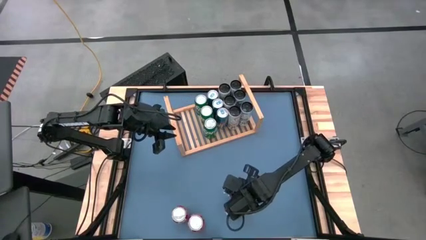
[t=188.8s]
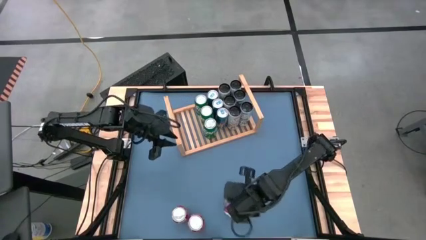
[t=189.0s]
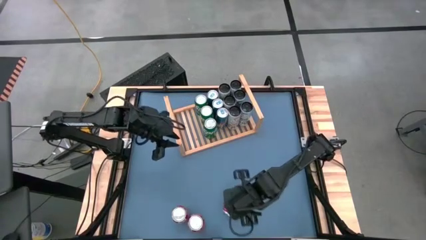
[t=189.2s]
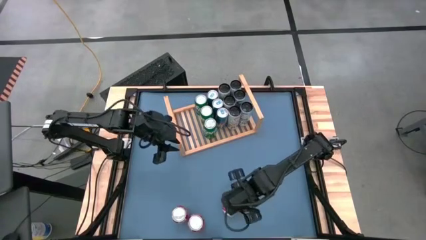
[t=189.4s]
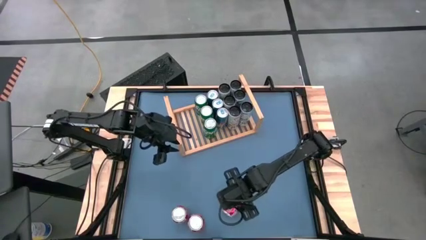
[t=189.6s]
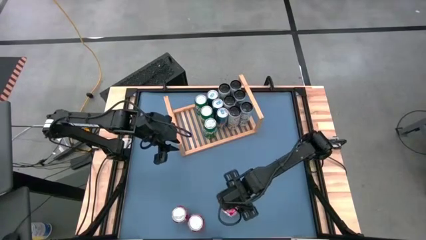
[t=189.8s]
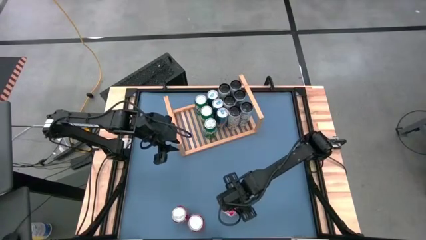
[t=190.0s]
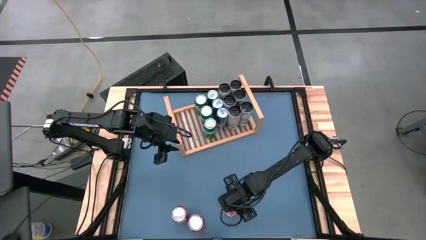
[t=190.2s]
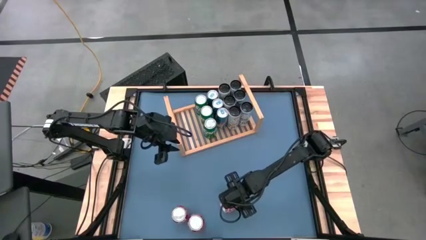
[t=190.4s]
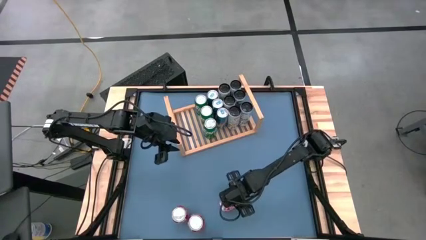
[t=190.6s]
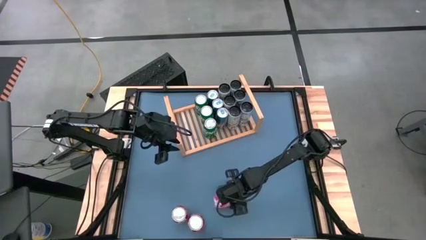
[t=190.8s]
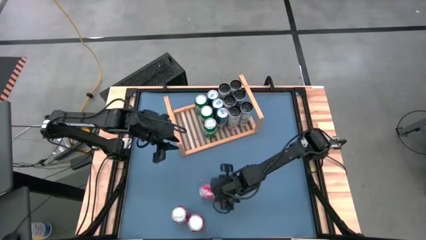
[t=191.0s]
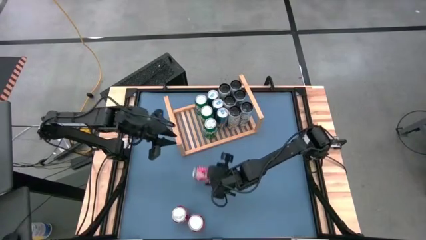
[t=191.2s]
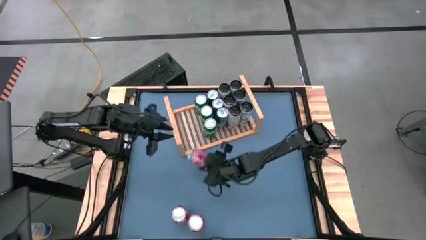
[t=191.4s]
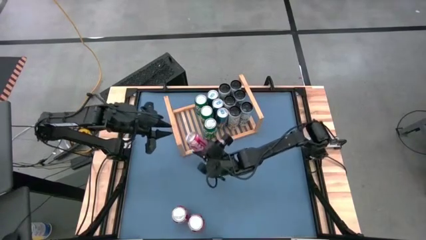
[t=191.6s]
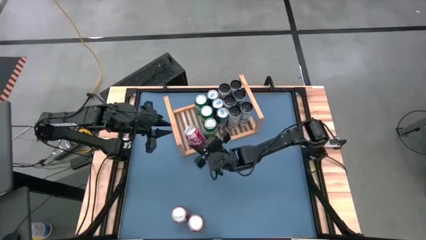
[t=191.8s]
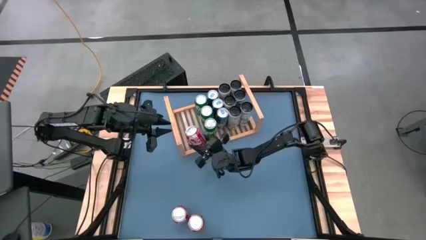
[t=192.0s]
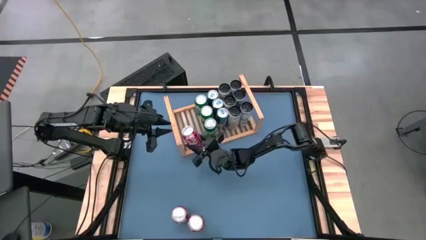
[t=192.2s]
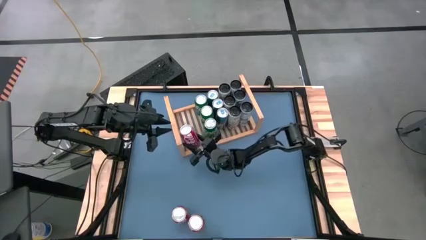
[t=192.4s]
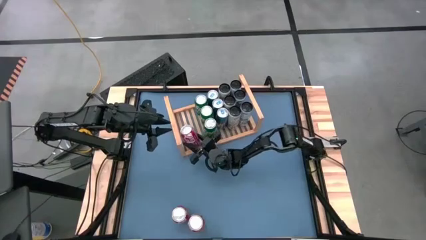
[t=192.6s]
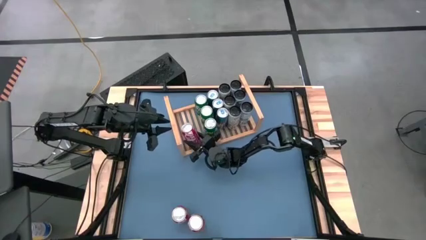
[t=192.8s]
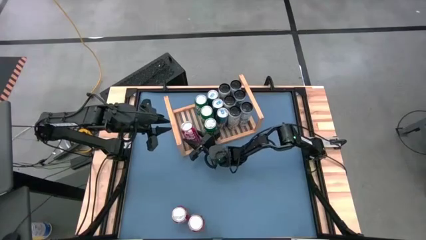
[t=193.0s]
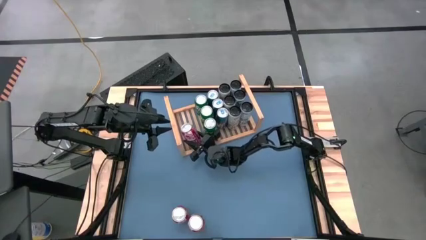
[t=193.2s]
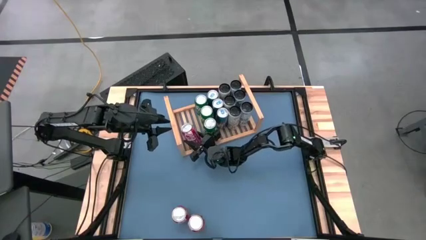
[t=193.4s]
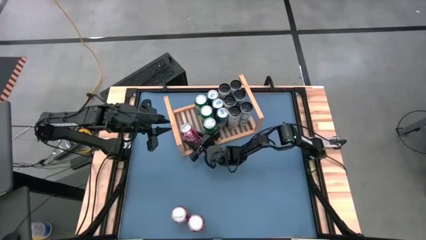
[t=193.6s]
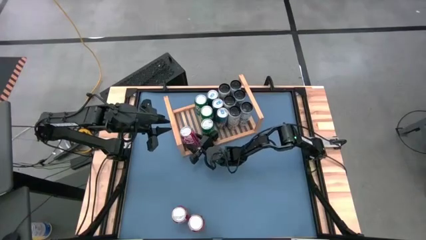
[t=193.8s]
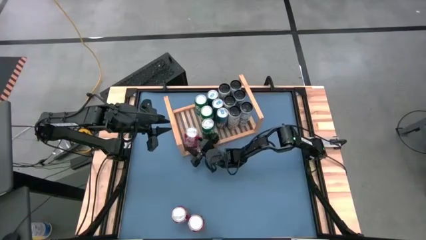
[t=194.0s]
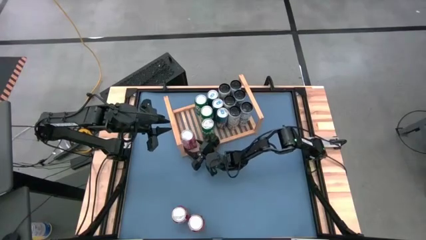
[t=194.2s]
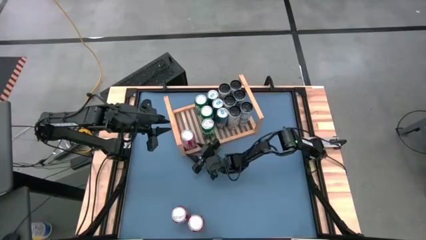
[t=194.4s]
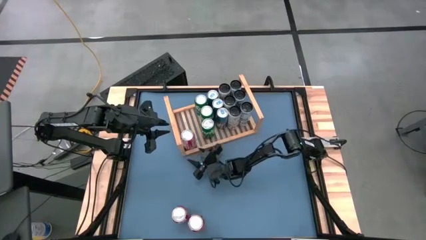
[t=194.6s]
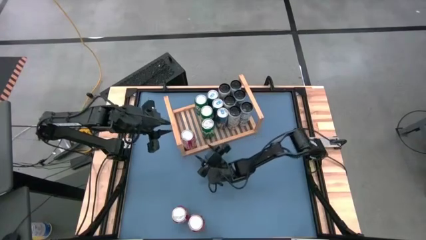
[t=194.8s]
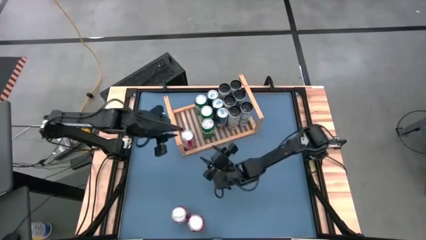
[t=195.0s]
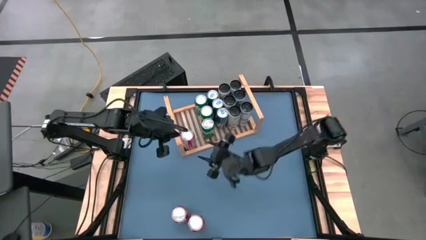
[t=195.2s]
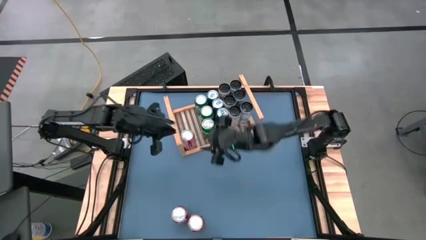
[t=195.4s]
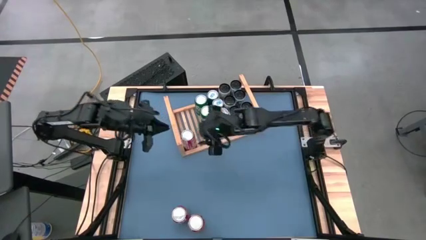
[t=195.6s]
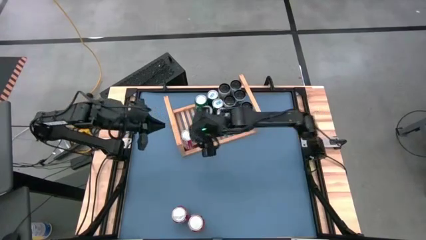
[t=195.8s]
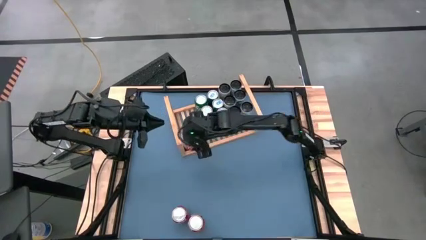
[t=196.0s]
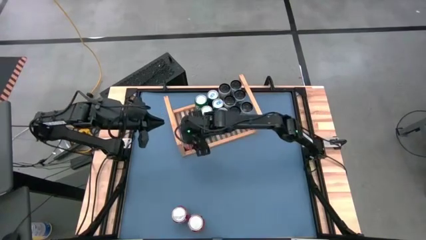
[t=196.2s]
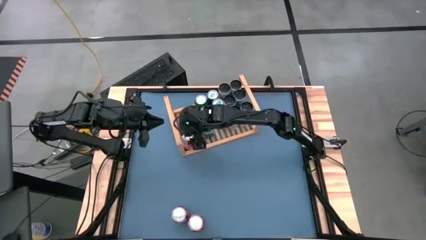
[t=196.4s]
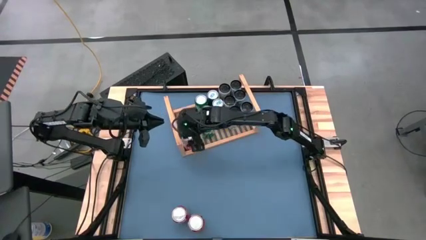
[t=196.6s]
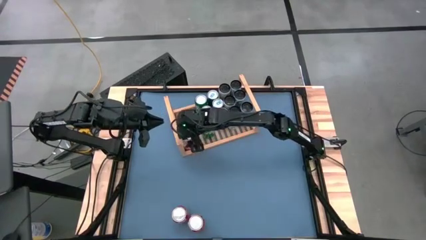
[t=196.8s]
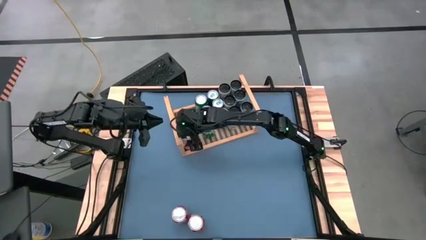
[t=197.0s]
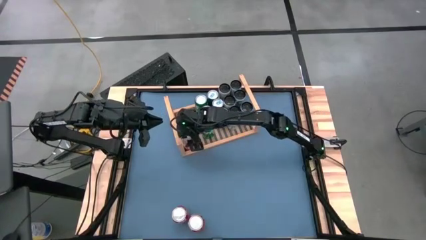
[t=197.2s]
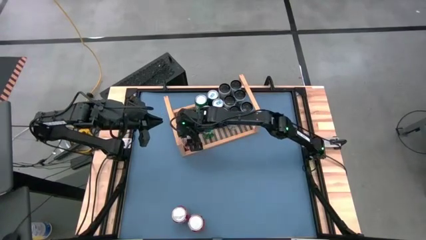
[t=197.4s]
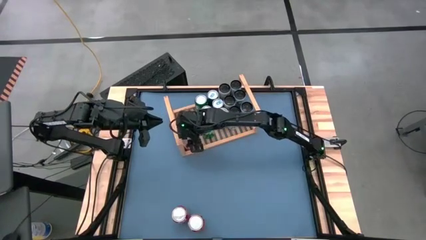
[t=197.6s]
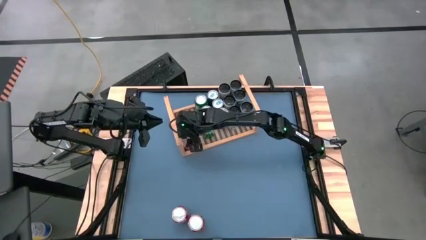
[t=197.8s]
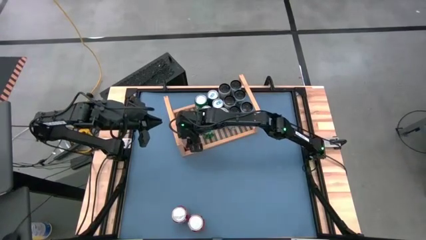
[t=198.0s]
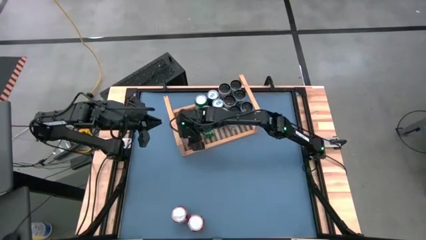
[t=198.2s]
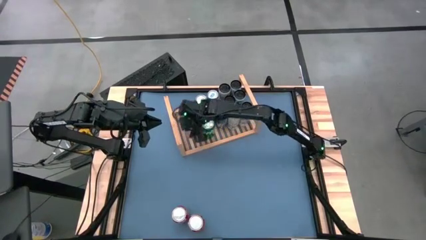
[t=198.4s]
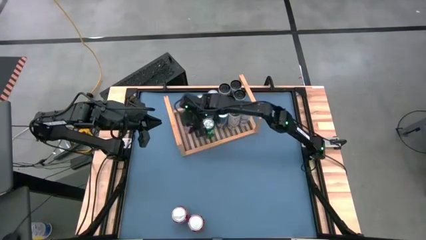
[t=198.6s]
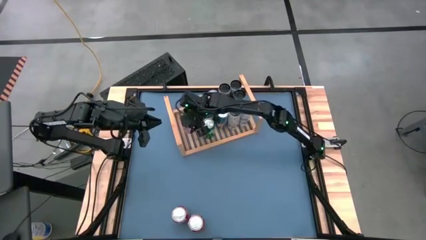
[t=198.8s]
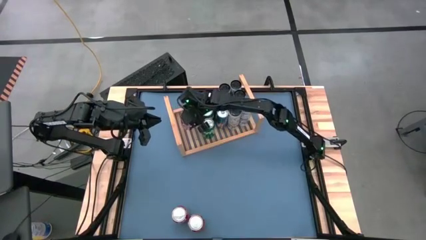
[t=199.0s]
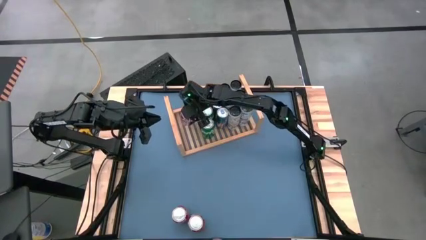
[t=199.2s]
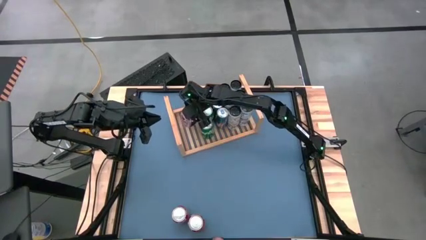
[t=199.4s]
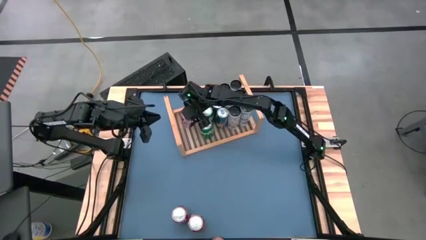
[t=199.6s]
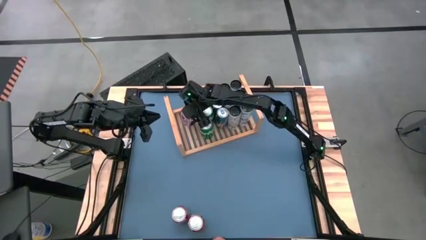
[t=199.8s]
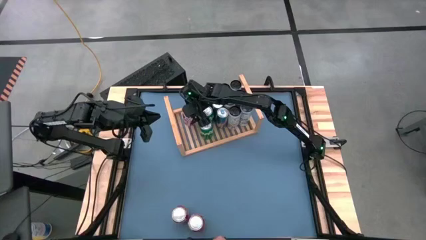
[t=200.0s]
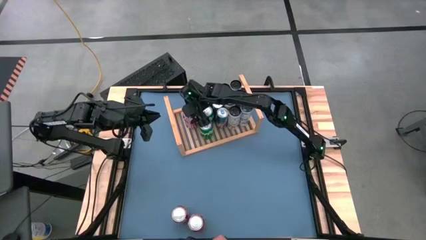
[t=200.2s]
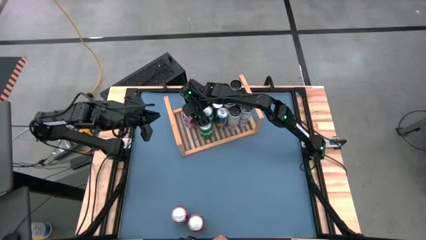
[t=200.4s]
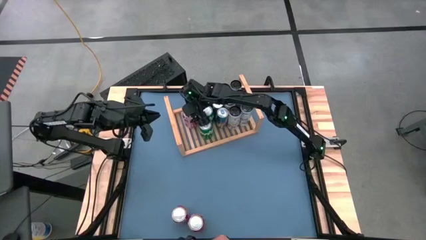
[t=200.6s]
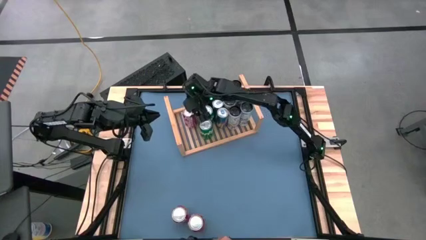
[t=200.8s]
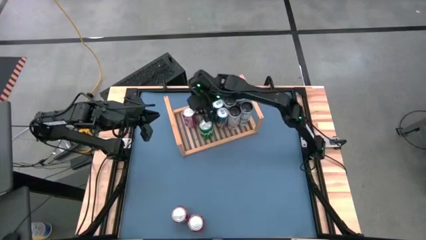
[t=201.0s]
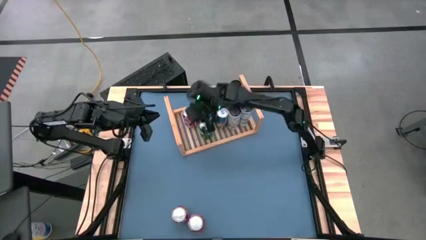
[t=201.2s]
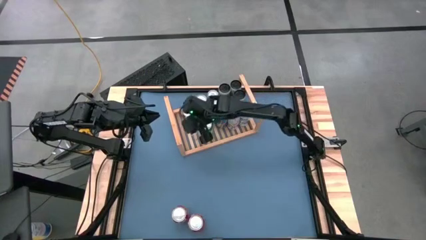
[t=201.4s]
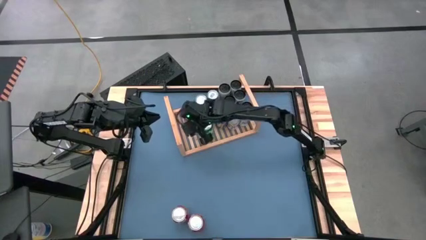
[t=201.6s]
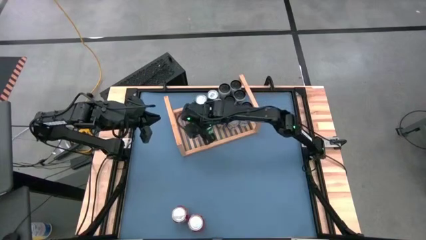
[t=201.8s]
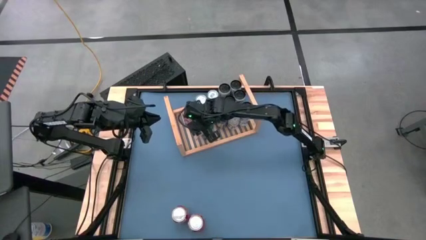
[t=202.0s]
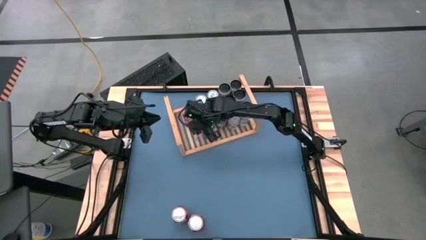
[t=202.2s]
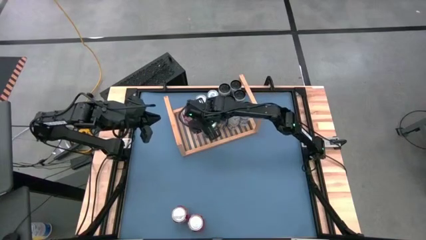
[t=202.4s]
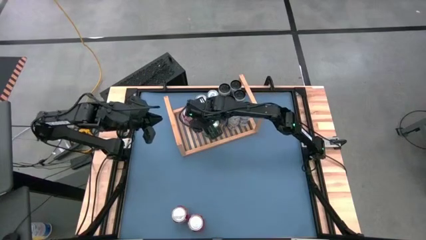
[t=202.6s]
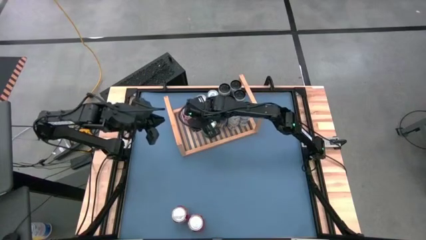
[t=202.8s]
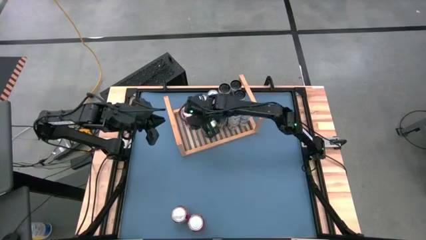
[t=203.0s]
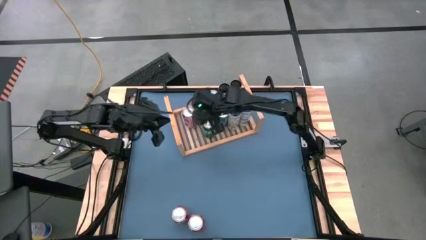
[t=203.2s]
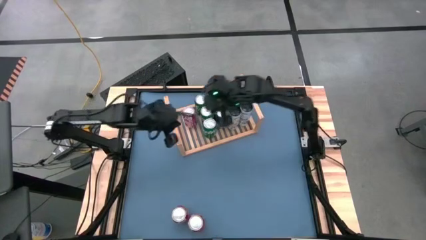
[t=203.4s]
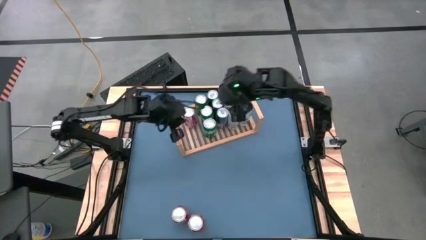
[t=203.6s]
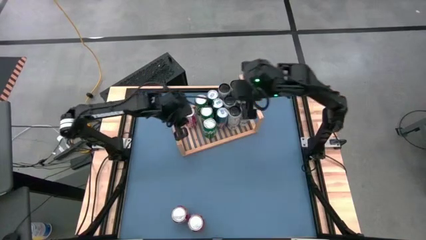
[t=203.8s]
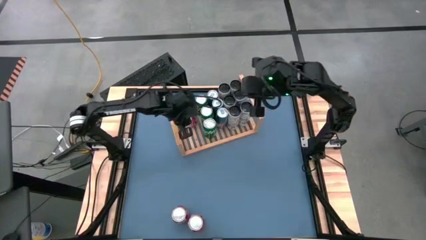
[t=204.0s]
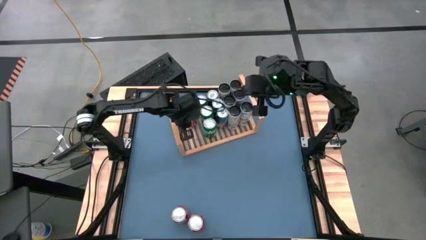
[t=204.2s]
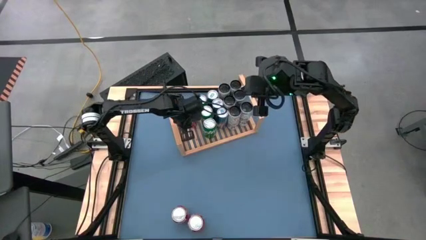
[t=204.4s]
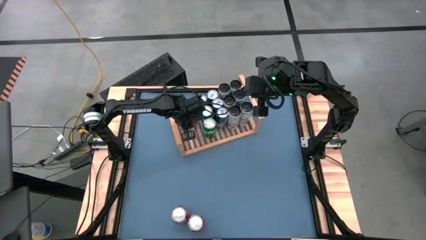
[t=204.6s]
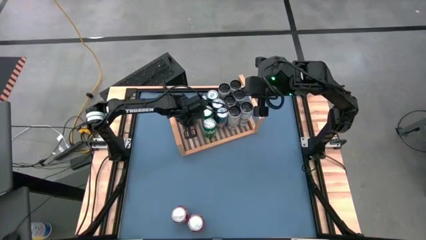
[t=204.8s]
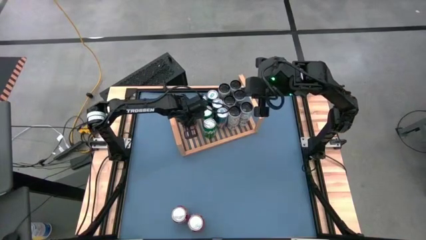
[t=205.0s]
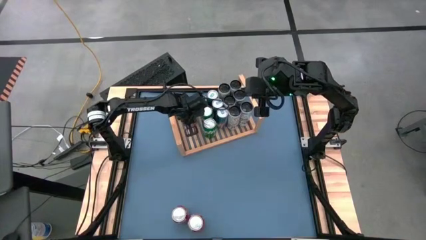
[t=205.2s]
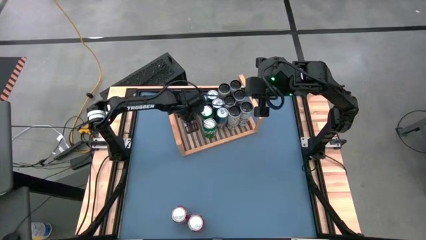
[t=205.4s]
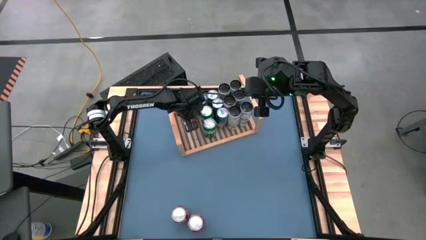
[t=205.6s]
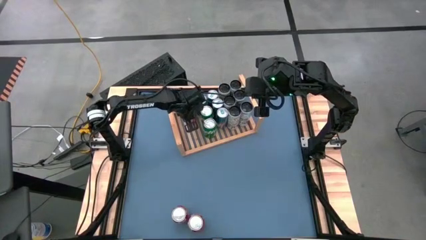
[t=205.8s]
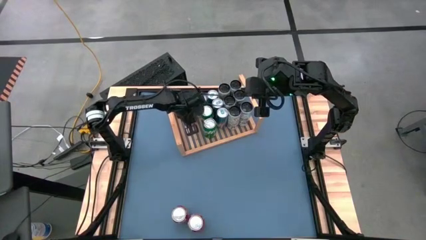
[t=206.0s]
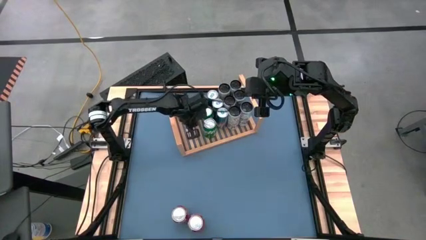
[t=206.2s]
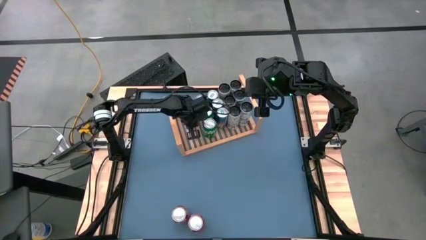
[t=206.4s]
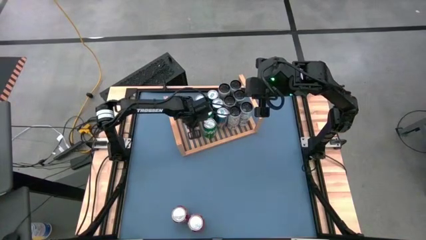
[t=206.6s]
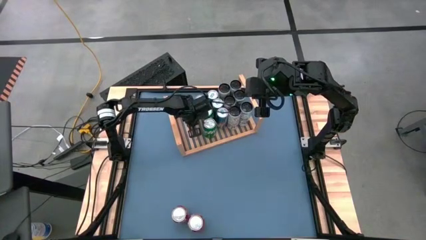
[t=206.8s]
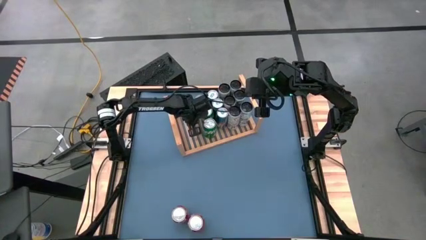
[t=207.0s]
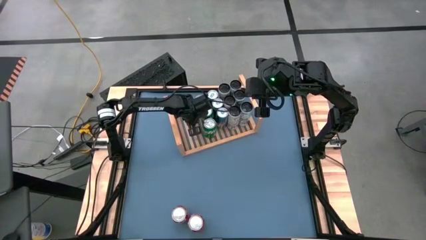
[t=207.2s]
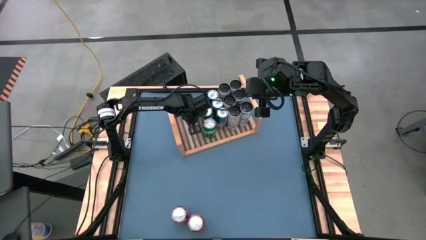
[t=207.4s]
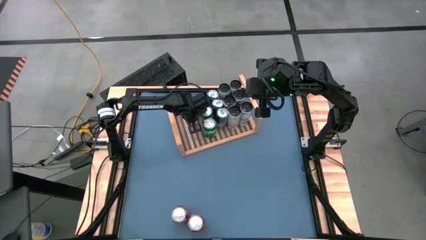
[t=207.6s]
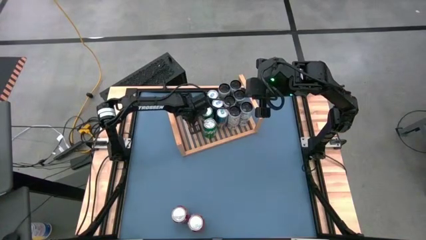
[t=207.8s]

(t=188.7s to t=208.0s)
Task: Place canned beverage on shelf
Put the red-white soda can on the shelf
